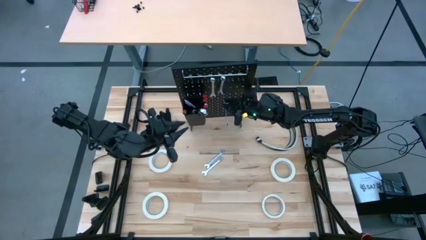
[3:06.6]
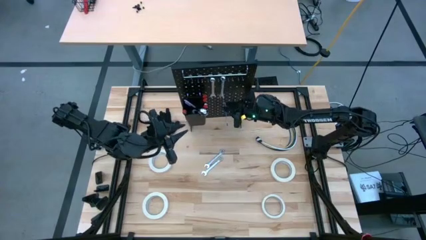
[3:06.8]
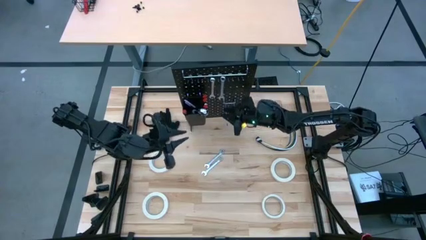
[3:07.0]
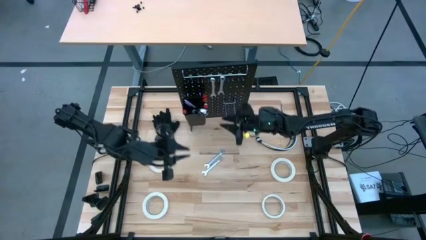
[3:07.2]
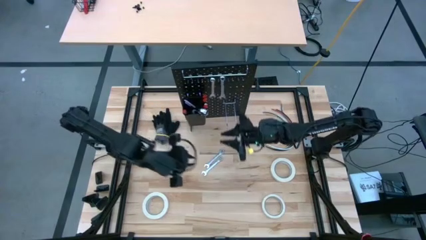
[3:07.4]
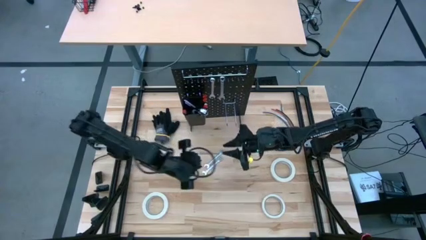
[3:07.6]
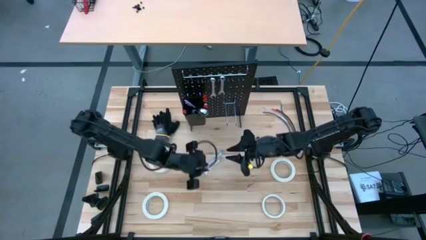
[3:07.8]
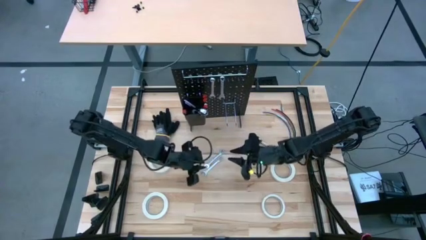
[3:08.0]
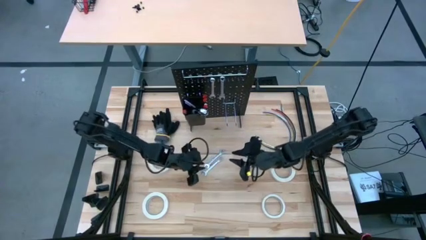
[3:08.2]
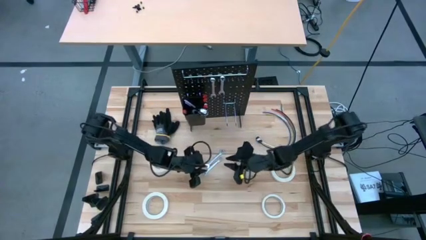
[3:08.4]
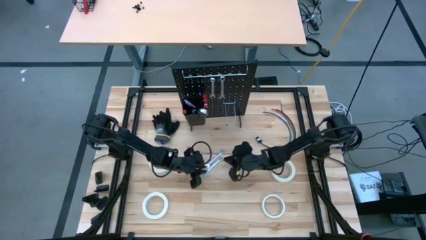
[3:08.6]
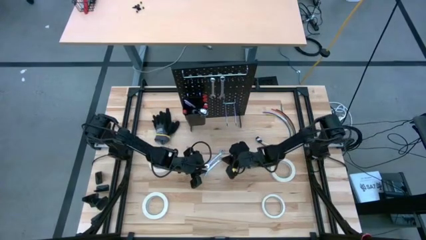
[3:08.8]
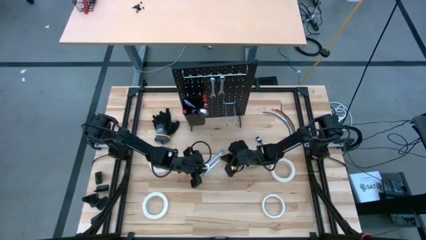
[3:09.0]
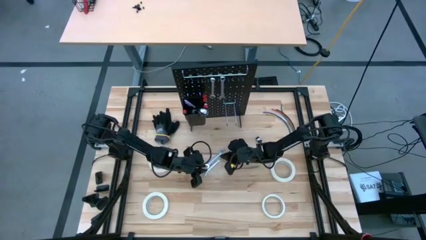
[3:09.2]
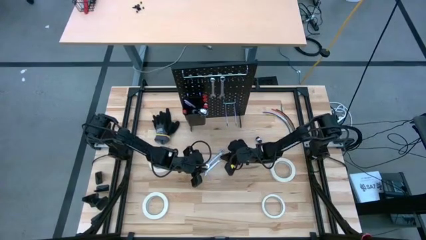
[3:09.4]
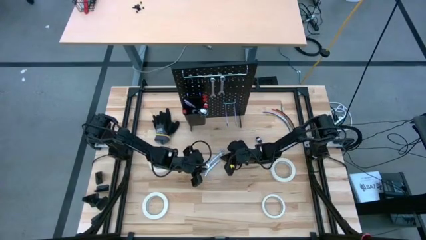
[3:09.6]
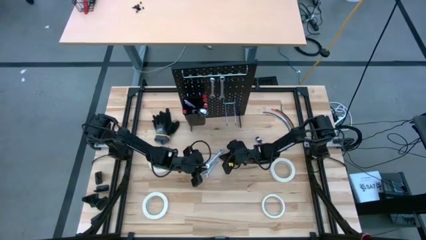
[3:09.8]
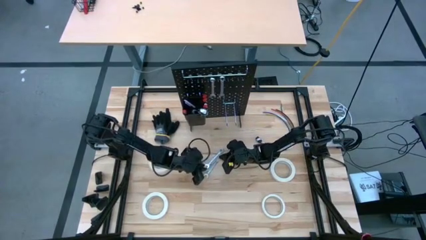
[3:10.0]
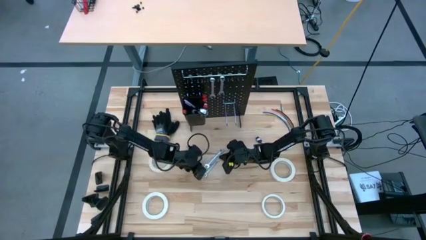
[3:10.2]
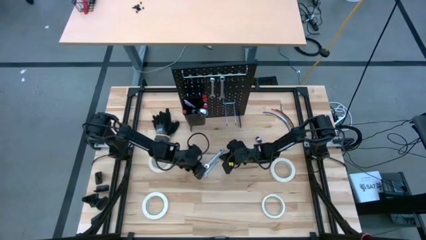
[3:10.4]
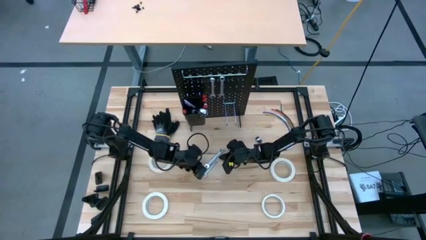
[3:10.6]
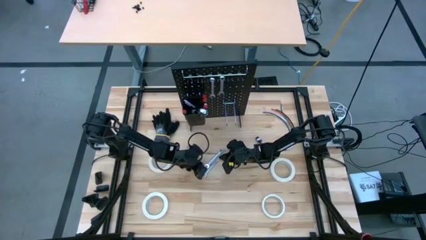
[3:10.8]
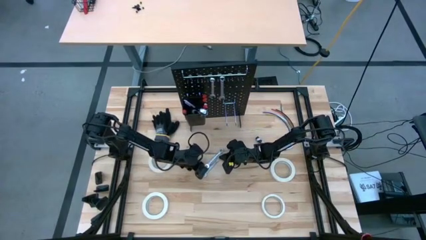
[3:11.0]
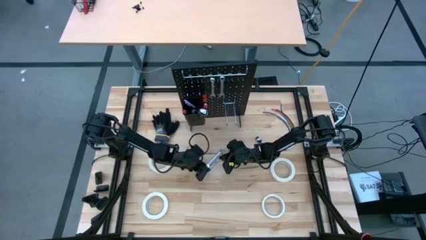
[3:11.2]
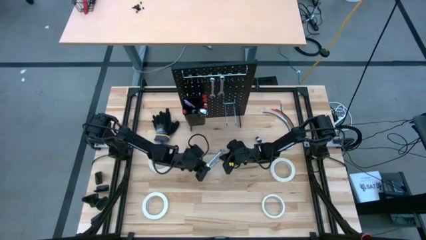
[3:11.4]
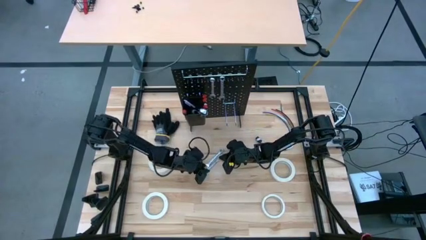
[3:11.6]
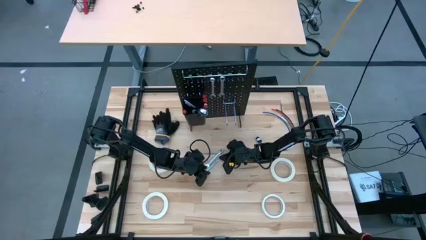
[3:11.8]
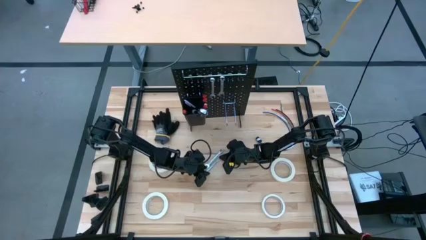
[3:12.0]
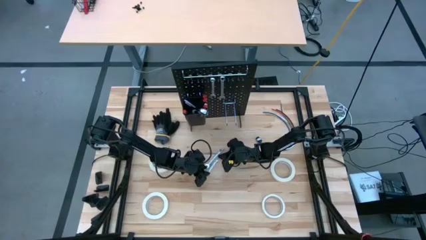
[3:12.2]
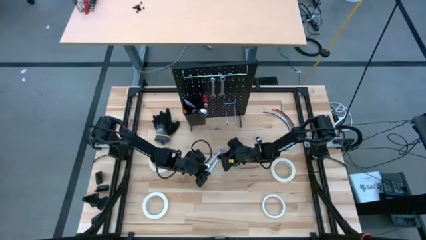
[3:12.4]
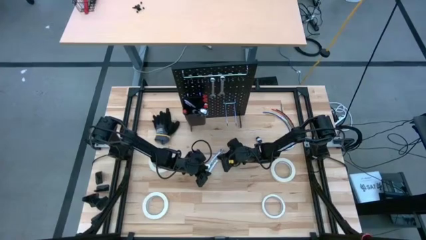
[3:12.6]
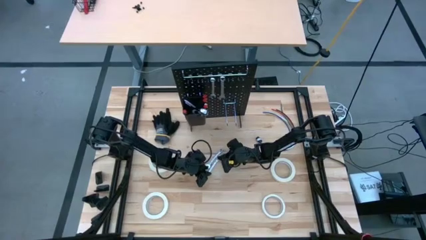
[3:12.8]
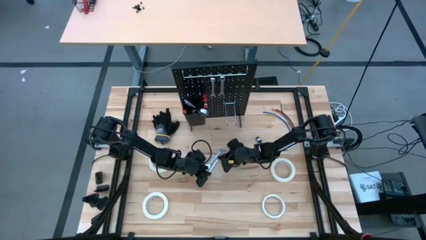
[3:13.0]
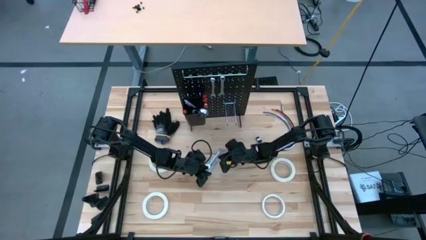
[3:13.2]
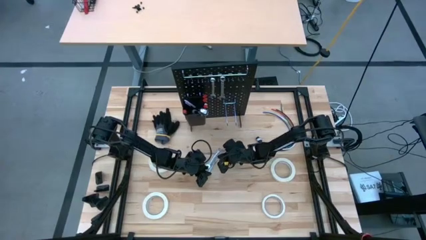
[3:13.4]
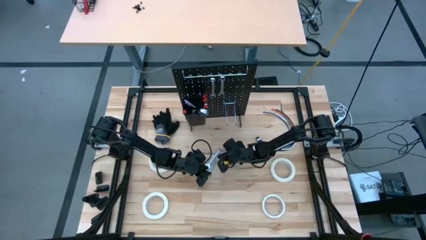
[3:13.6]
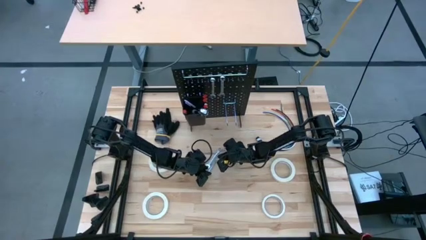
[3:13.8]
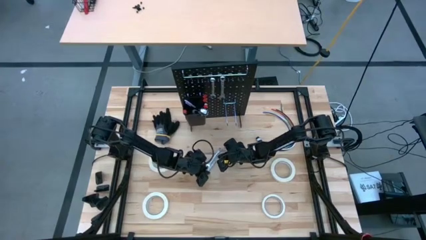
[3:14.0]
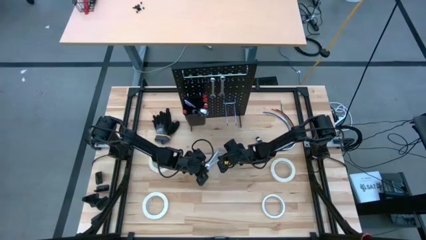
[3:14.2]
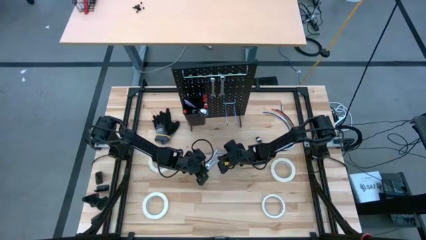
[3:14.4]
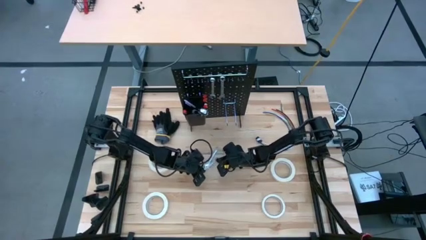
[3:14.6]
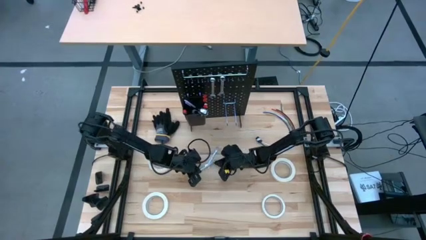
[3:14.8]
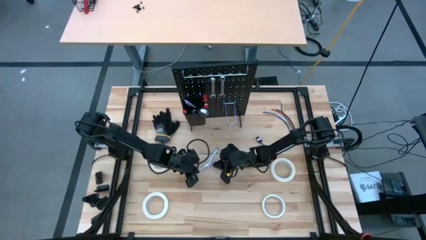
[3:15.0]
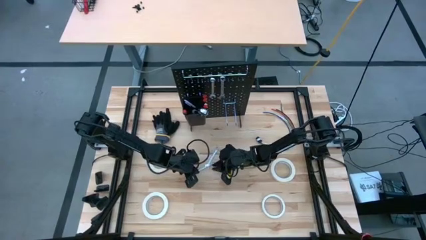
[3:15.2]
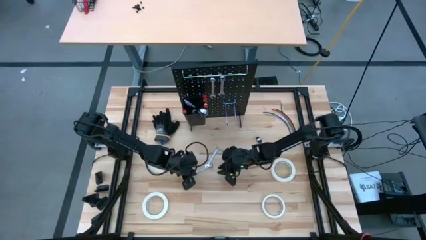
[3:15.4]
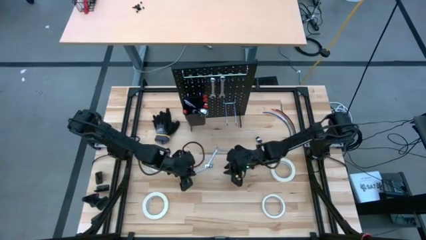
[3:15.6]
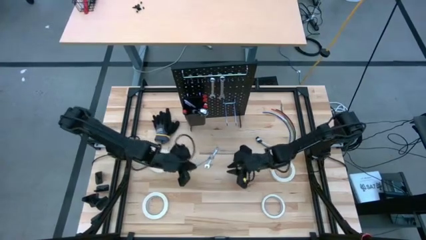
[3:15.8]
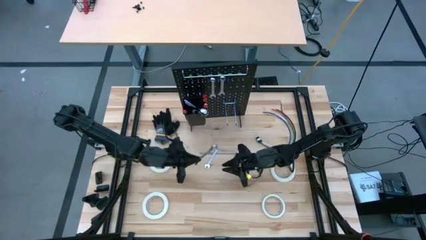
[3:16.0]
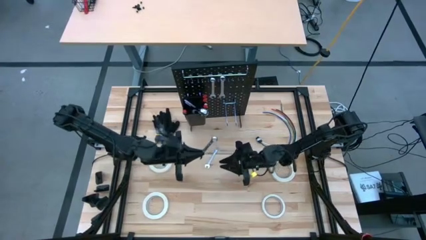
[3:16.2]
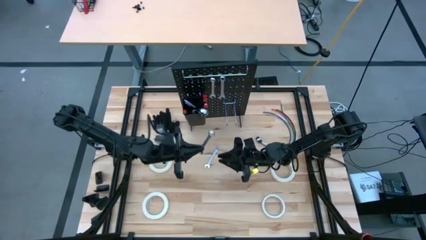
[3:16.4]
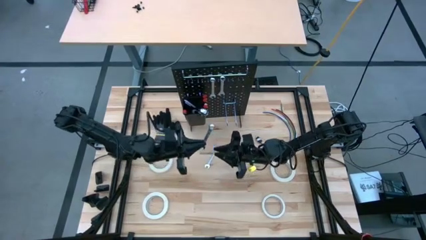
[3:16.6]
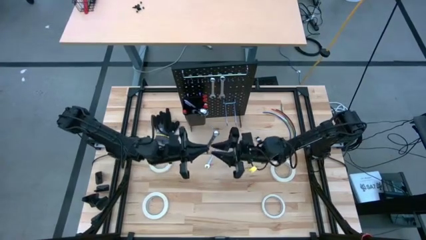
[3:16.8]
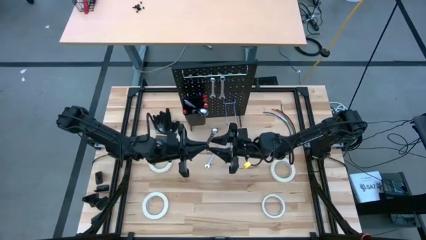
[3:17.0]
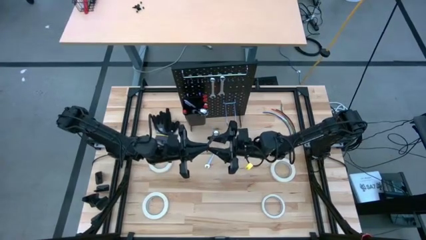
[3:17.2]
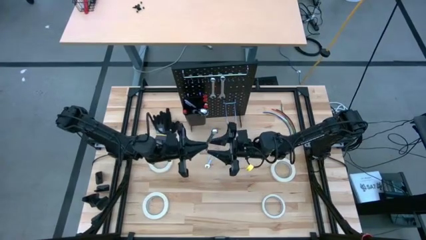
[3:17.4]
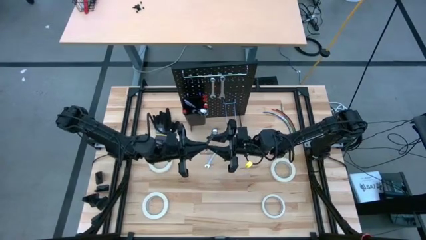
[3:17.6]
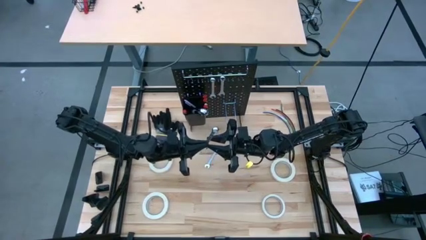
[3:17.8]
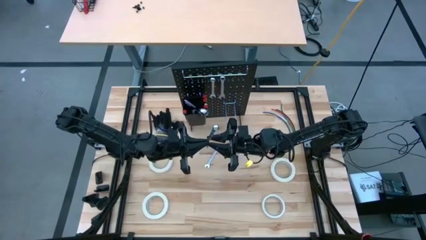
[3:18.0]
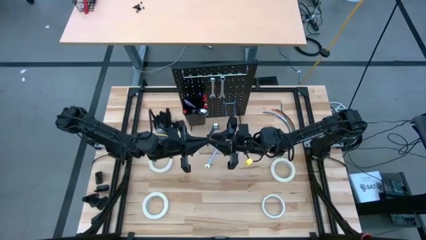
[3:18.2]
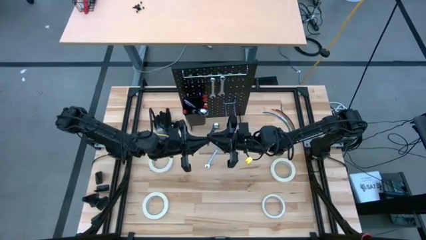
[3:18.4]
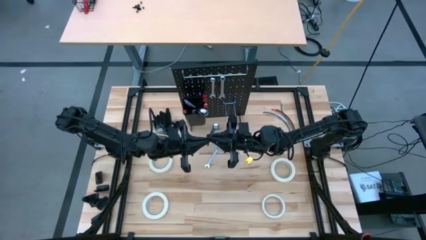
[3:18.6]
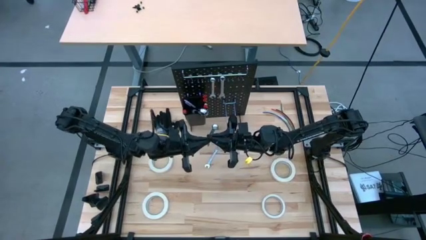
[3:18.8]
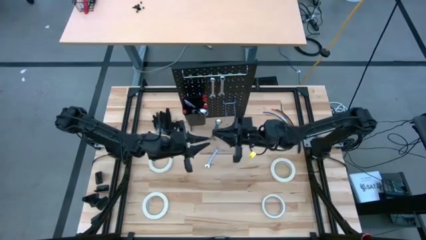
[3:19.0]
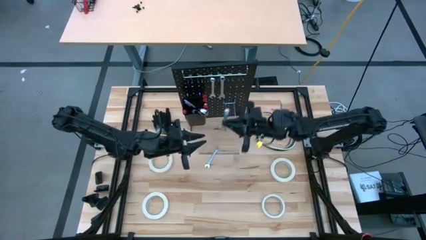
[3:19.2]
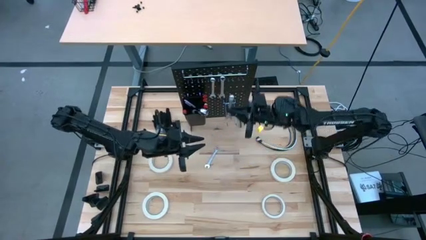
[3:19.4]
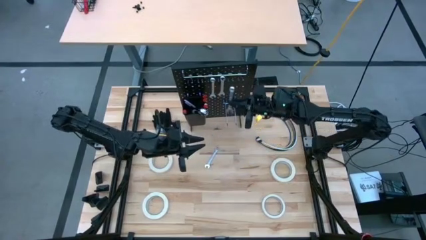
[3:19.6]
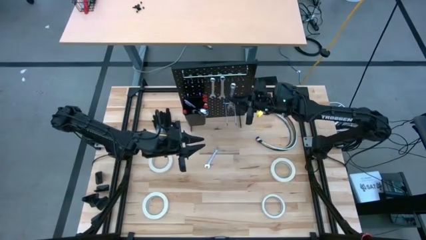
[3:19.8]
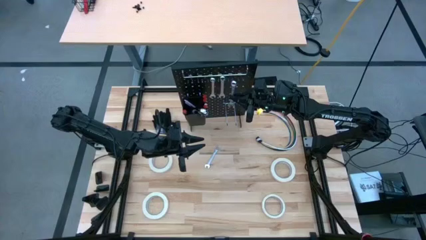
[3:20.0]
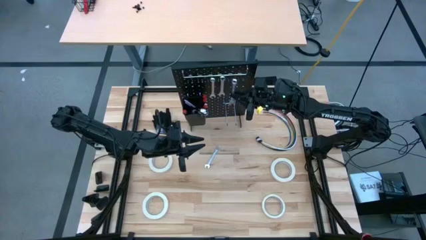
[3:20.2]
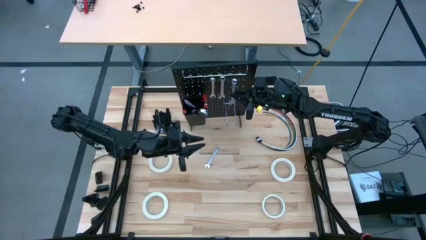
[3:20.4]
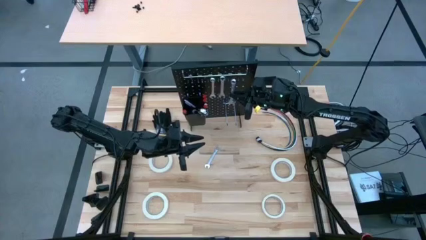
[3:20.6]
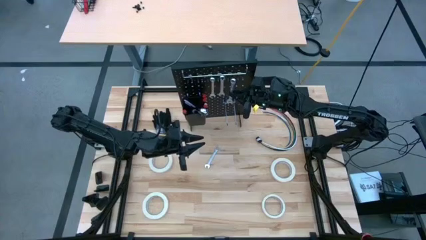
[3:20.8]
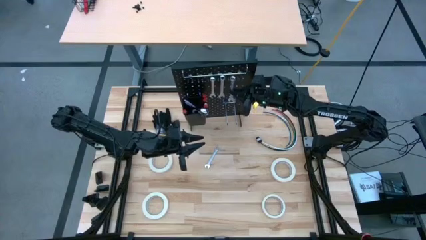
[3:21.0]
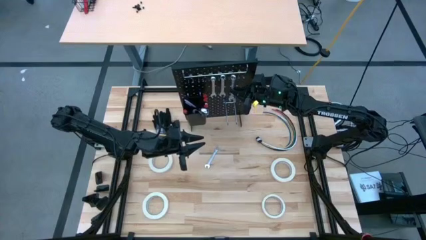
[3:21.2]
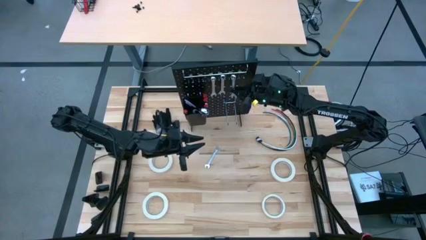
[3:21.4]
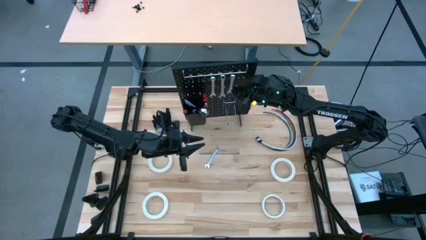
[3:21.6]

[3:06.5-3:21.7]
Task: Hang tools onto peg board
Hang the wrench on the peg board
